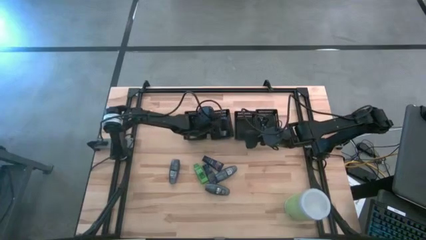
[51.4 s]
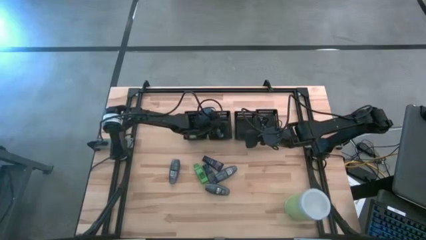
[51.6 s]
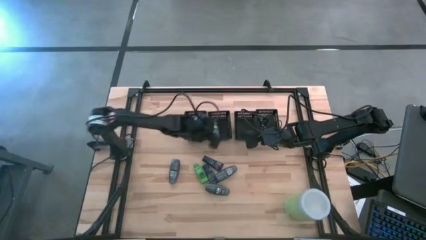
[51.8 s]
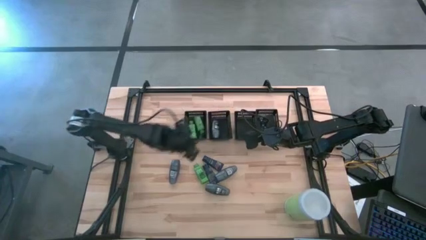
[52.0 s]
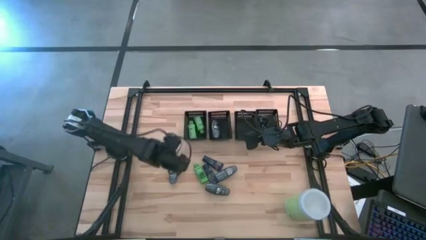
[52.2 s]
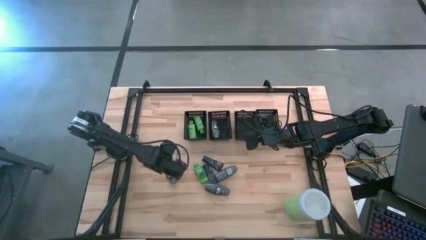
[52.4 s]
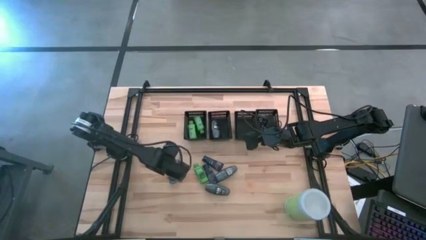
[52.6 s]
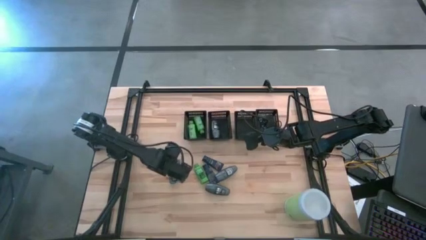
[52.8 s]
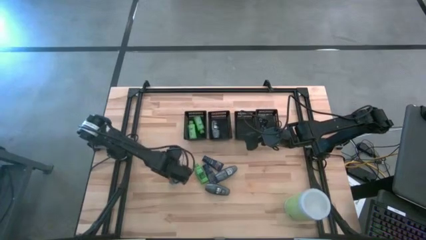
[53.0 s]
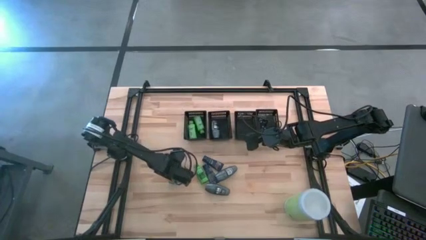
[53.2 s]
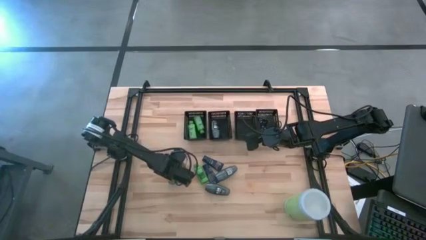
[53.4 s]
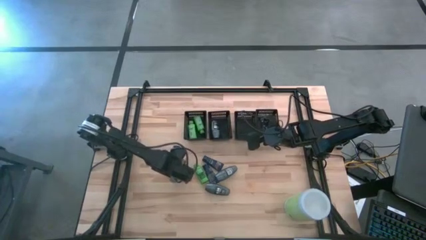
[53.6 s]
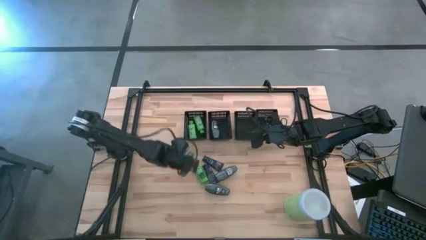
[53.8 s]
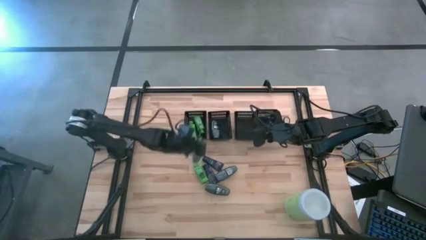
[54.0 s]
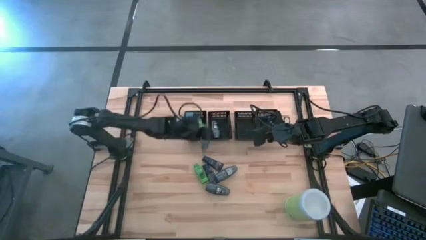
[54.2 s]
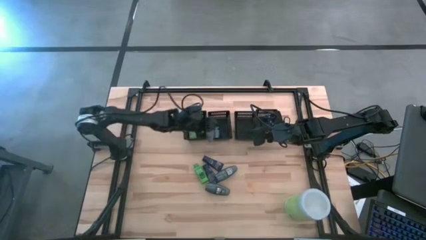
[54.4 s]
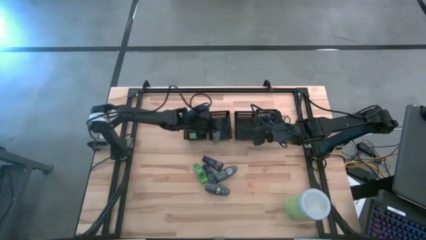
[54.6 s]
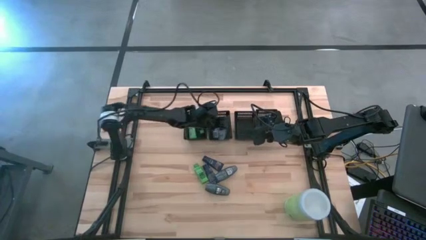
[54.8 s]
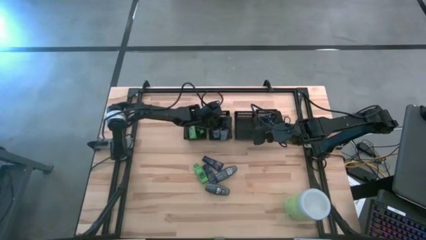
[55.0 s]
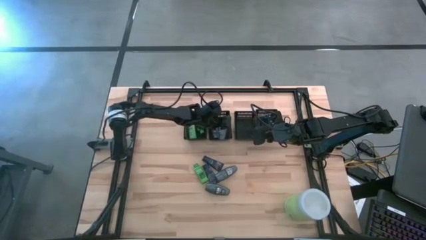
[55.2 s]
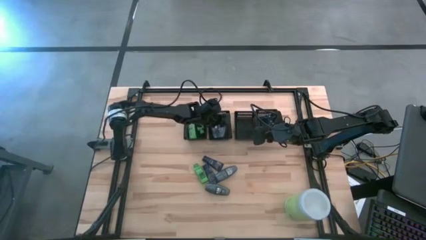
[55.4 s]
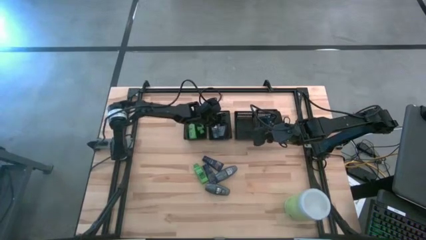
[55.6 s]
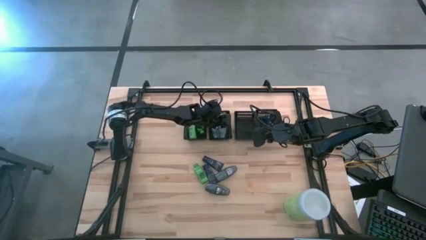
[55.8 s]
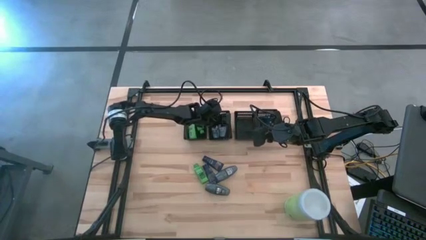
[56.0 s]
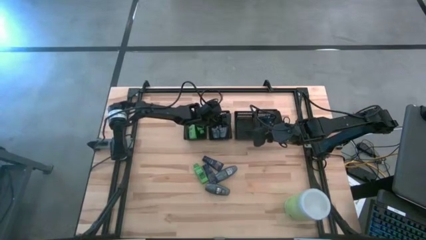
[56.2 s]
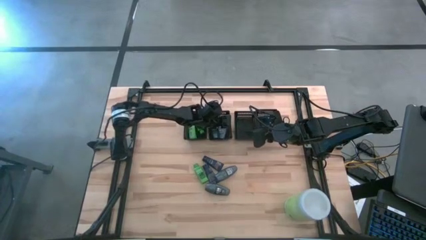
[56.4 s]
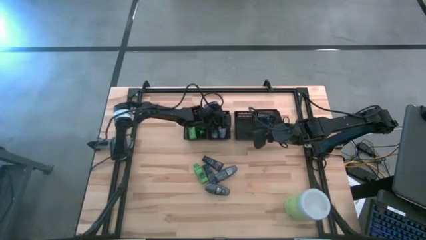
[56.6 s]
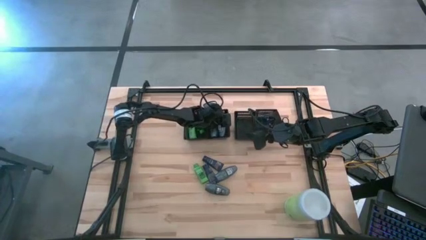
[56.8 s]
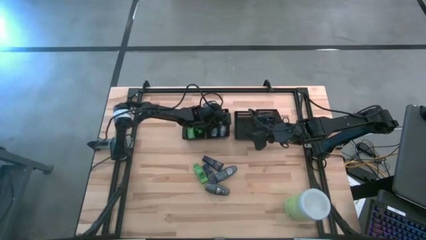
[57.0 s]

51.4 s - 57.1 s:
Task: Pick & Place Travel size toiletries
Put the roll-on into the center left black basket

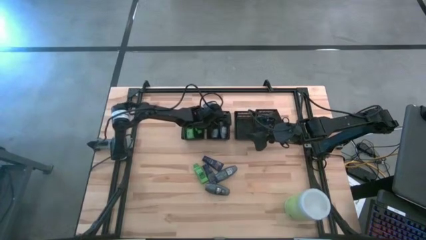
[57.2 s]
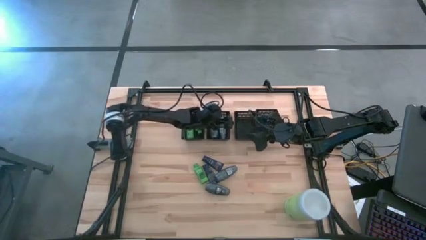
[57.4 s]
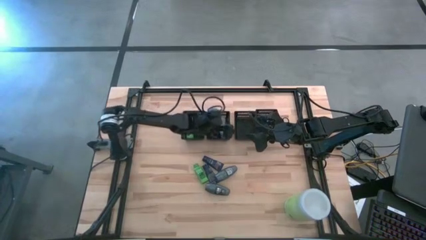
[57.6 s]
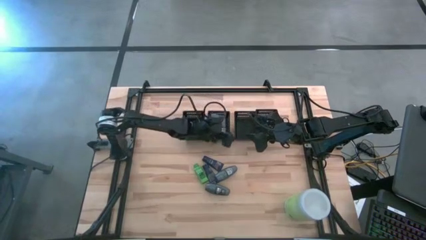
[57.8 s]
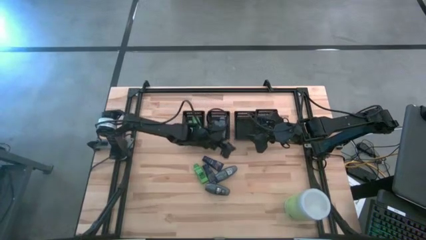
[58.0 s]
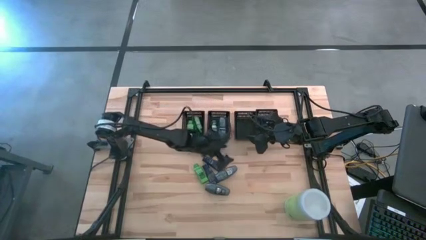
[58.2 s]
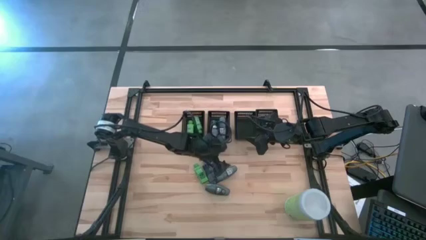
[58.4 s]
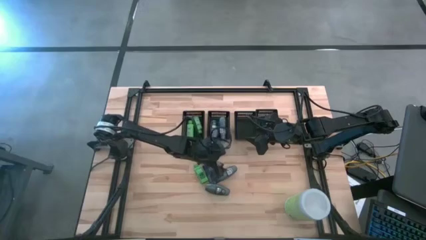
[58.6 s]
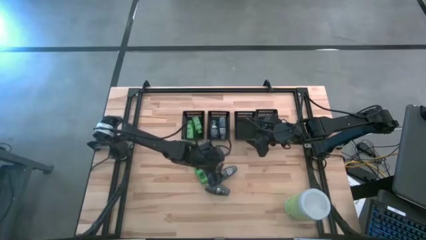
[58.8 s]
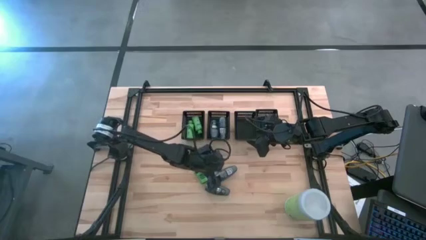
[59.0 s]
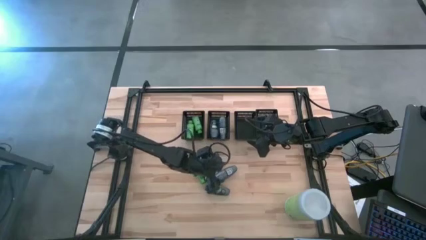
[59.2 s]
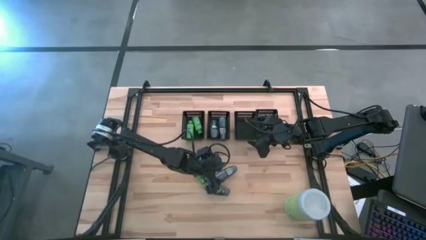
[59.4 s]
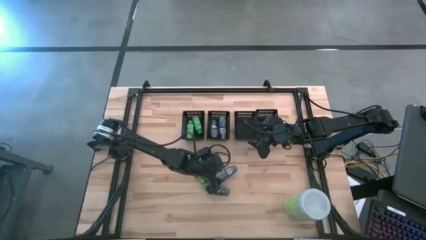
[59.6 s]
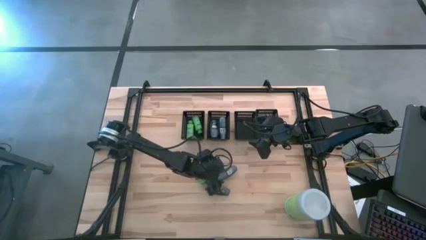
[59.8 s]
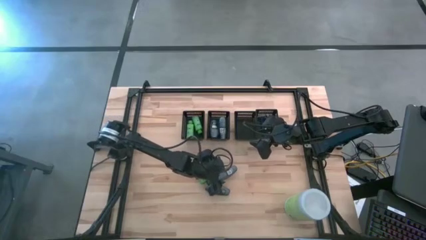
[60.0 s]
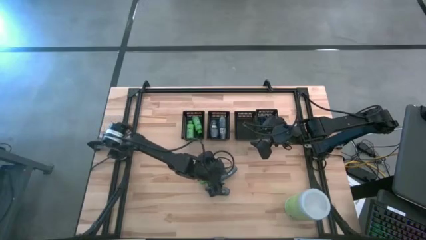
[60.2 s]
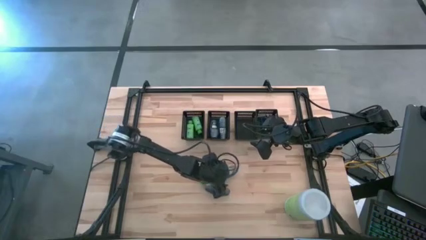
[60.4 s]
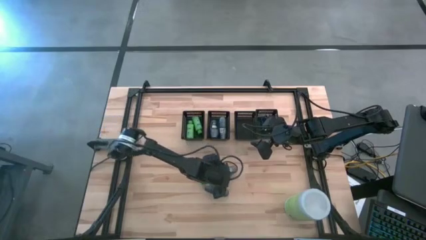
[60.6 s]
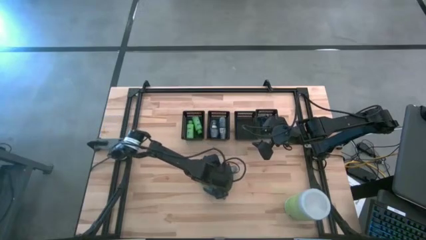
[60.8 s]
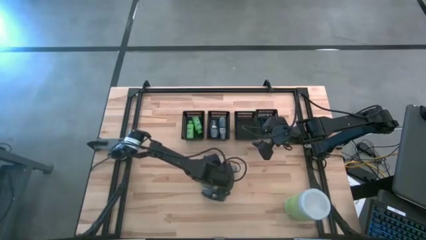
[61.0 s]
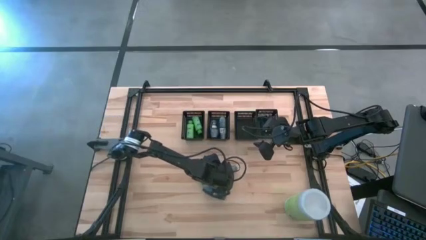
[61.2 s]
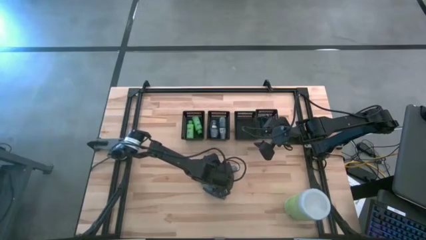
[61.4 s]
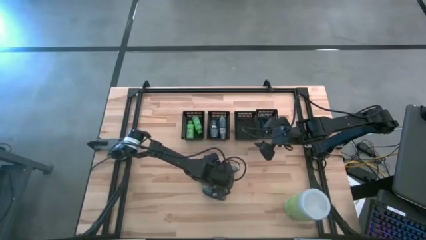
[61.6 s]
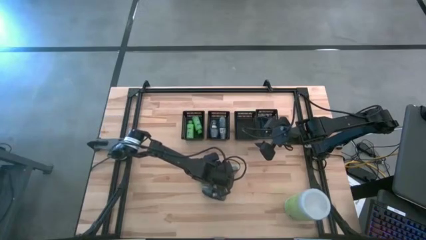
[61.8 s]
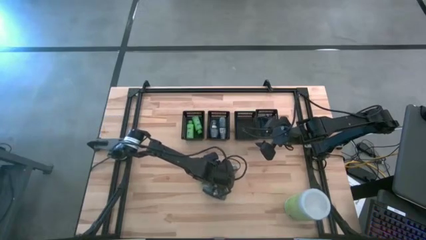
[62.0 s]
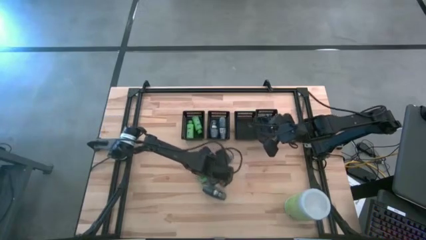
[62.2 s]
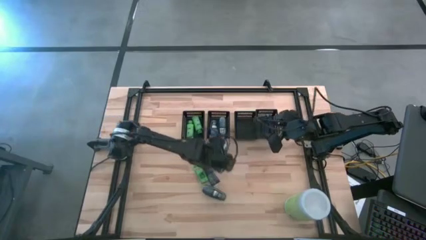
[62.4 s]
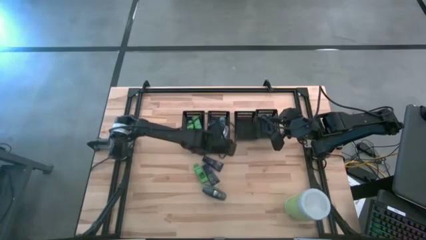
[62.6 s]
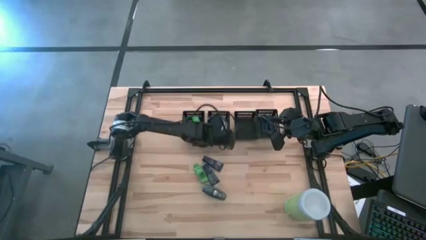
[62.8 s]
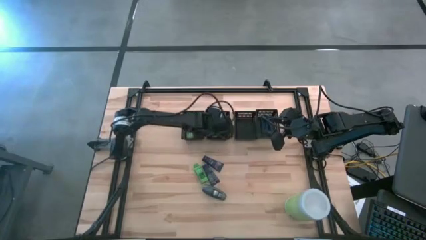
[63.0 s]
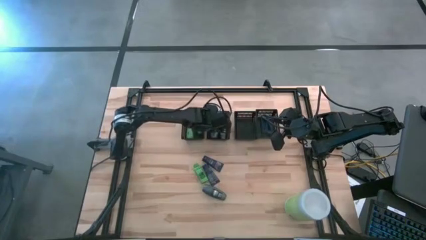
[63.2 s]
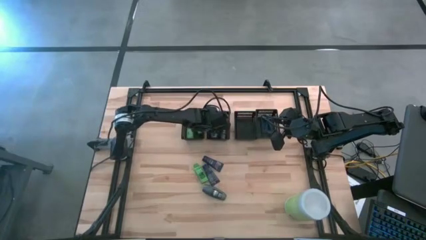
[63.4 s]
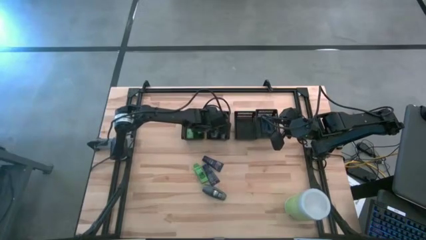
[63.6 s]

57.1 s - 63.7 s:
Put the roll-on into the center left black basket

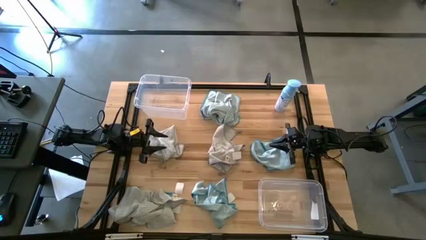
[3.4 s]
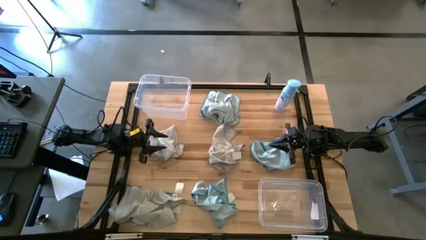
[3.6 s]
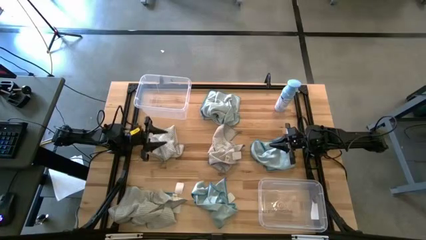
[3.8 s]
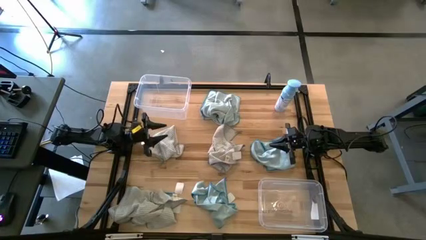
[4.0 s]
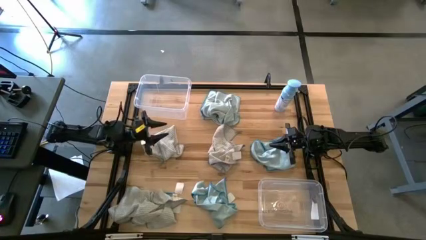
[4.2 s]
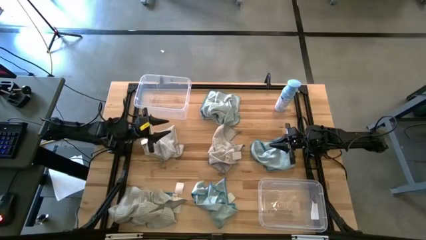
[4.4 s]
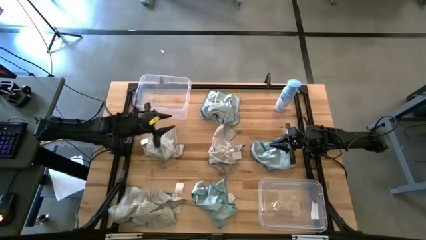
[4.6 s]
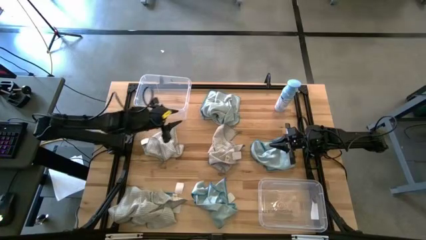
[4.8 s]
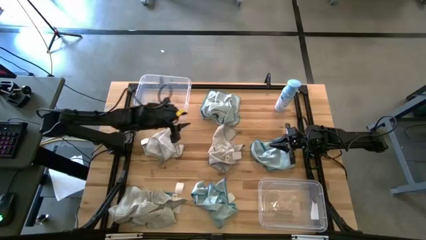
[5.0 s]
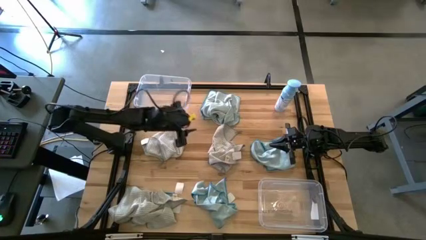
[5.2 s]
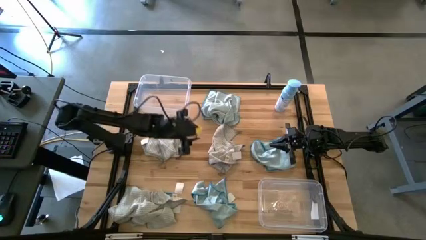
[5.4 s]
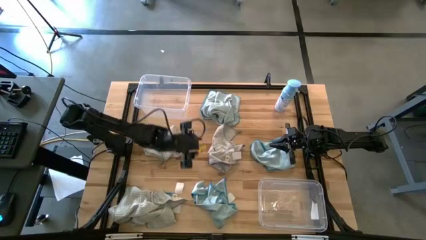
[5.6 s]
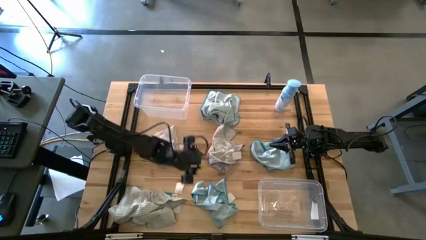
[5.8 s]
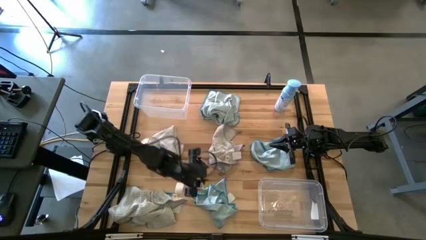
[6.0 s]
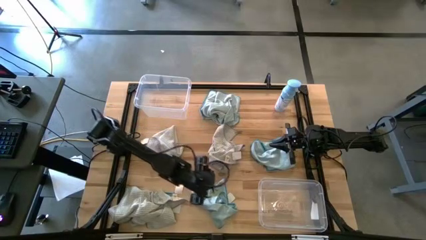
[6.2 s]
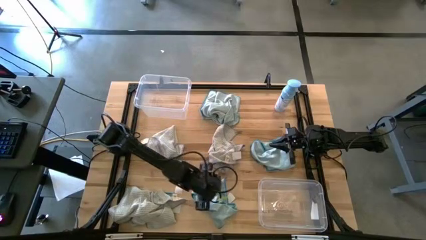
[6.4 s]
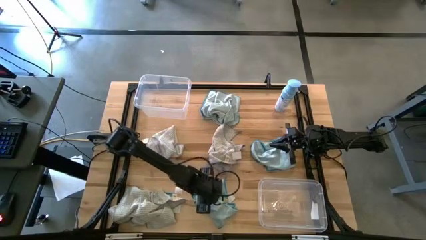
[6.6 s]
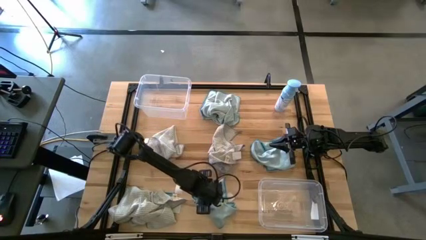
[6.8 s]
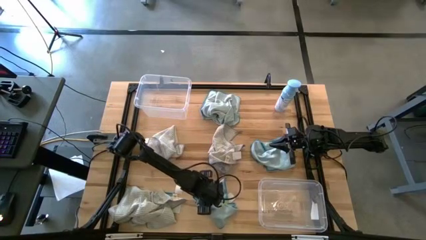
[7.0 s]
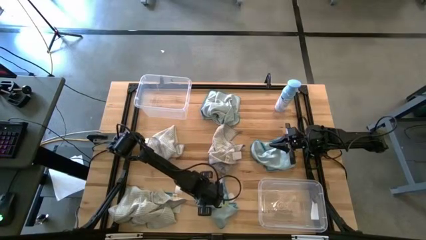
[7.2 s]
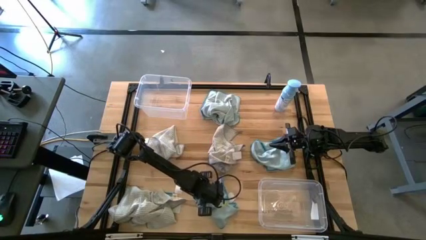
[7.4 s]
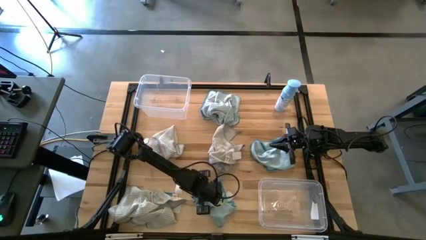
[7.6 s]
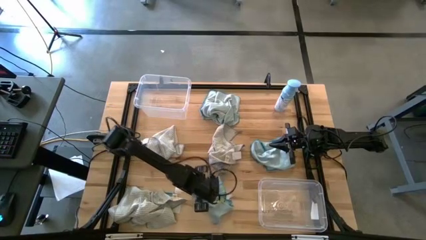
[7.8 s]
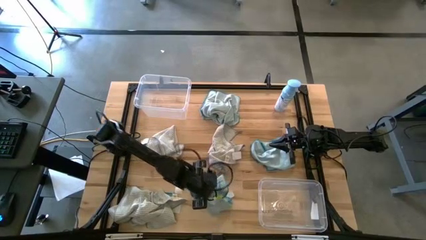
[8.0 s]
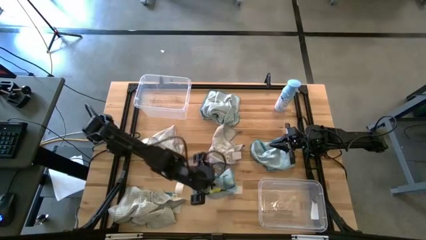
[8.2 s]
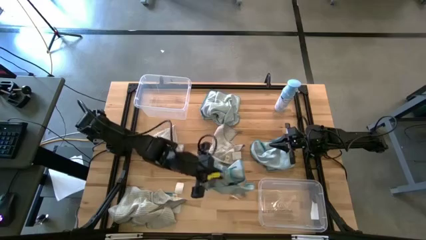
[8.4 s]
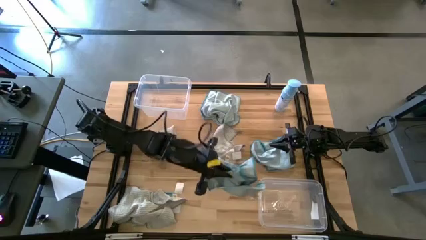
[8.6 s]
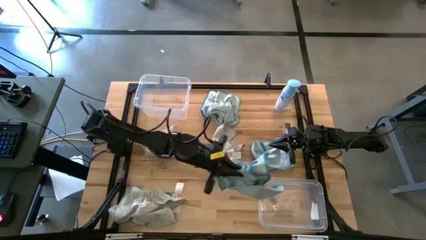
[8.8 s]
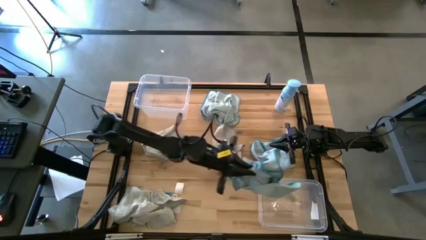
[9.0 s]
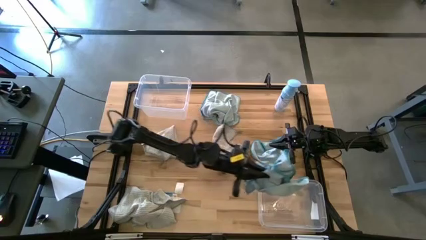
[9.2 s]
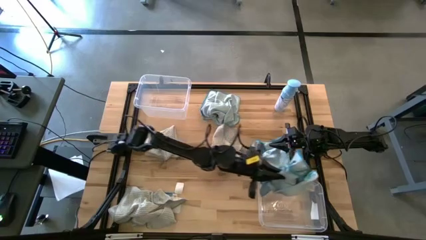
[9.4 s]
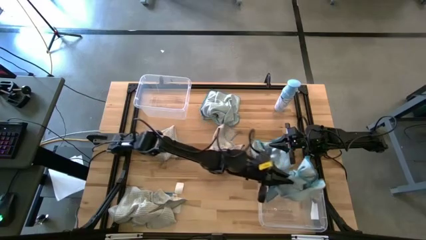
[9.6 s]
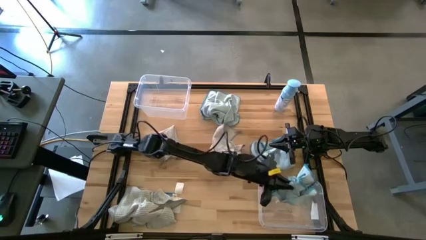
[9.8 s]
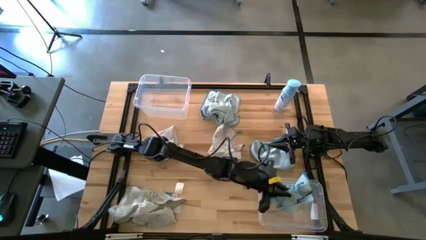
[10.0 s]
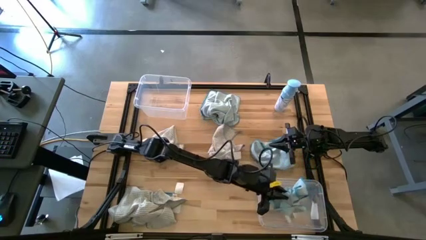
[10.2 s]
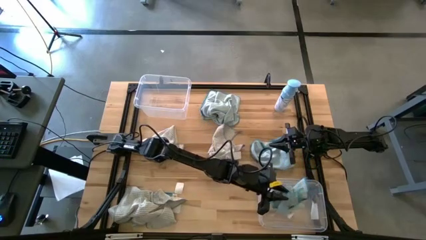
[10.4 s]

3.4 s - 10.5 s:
Task: Sort microfiber towel by color & place in baskets
Put the bottom center blue microfiber towel into the bottom transparent bin
